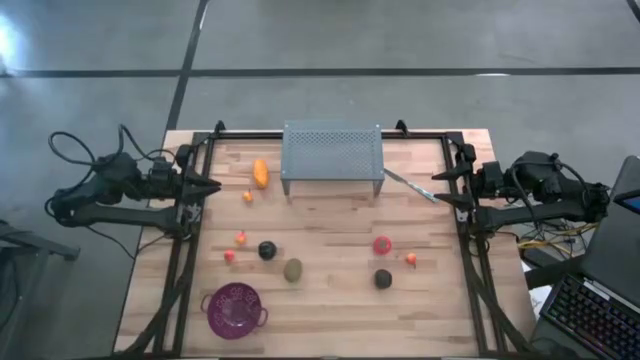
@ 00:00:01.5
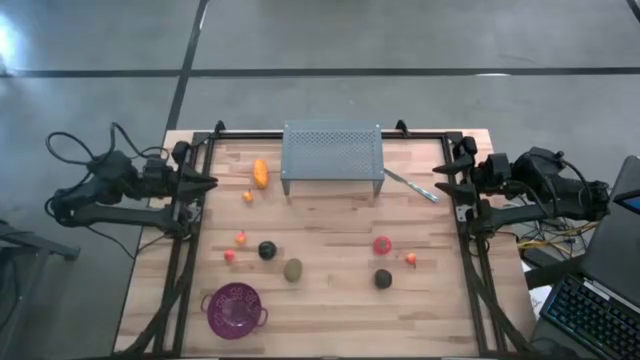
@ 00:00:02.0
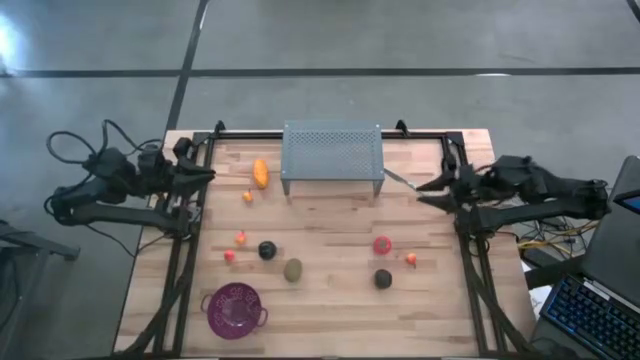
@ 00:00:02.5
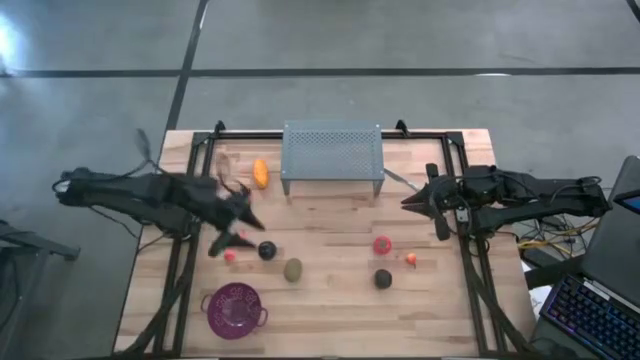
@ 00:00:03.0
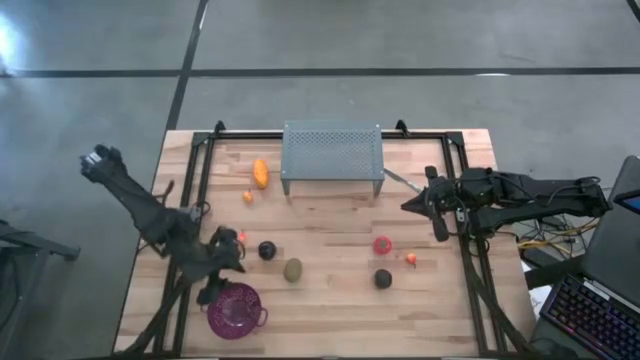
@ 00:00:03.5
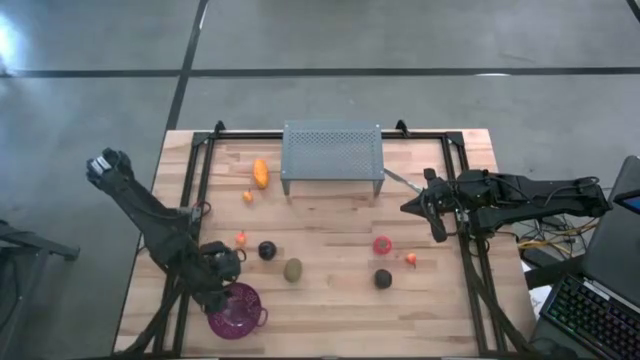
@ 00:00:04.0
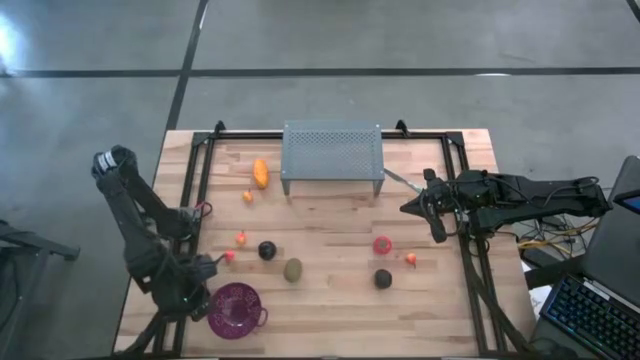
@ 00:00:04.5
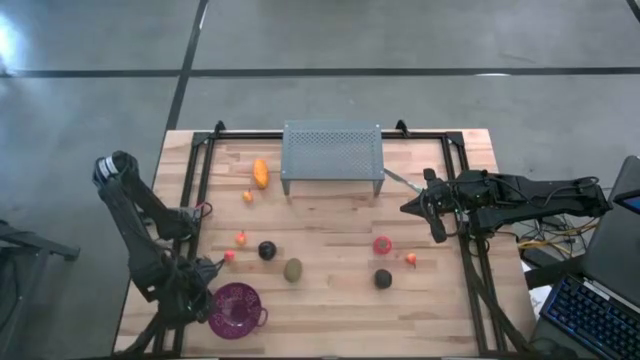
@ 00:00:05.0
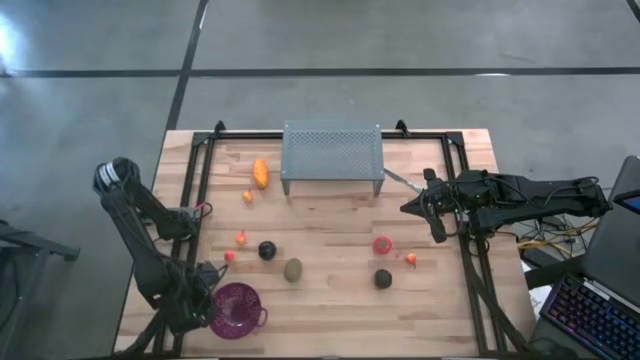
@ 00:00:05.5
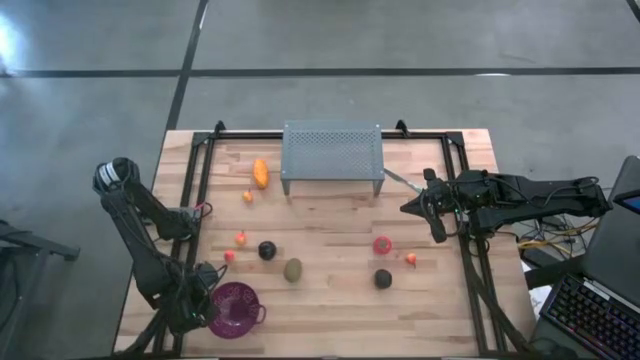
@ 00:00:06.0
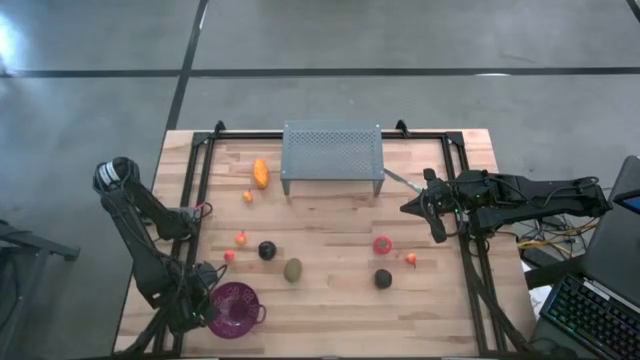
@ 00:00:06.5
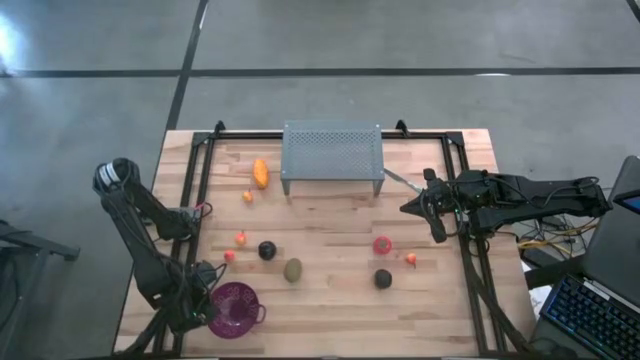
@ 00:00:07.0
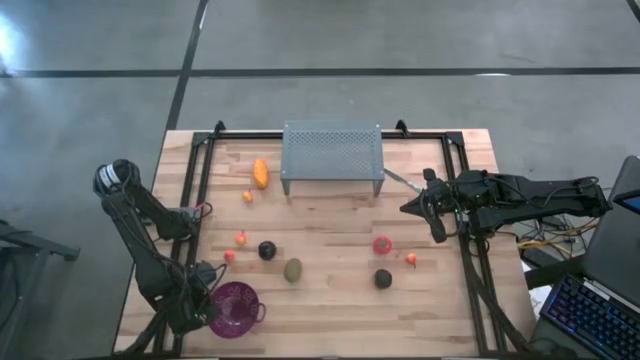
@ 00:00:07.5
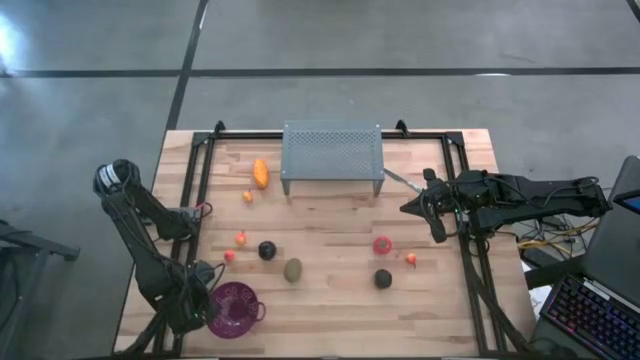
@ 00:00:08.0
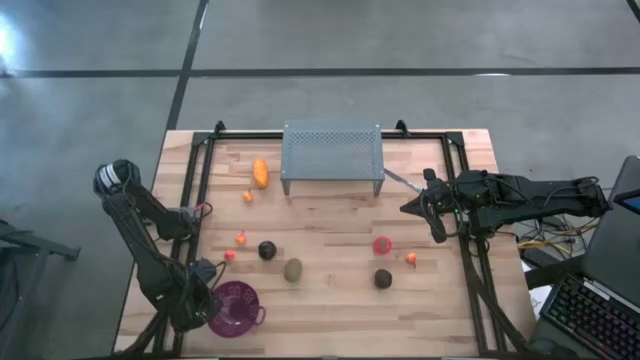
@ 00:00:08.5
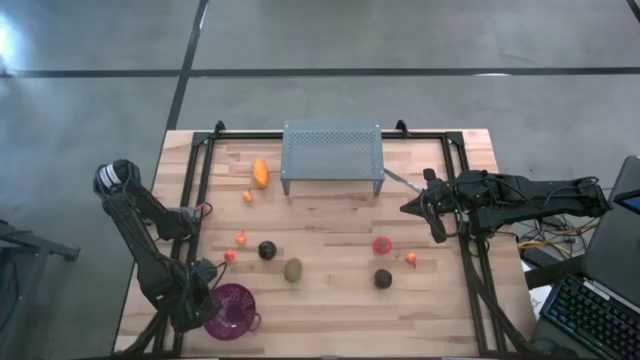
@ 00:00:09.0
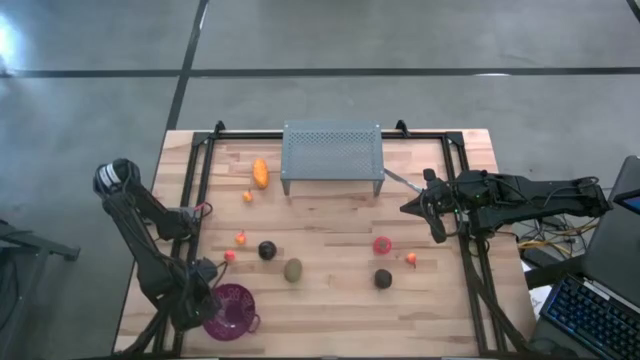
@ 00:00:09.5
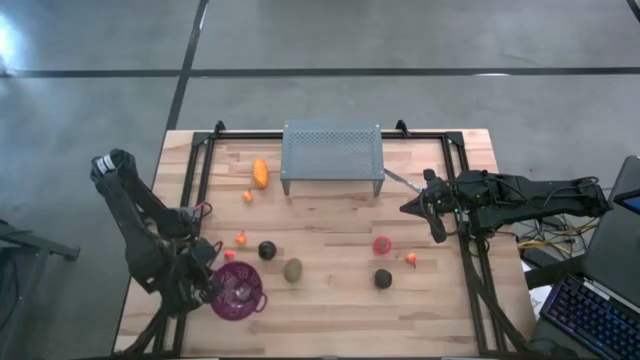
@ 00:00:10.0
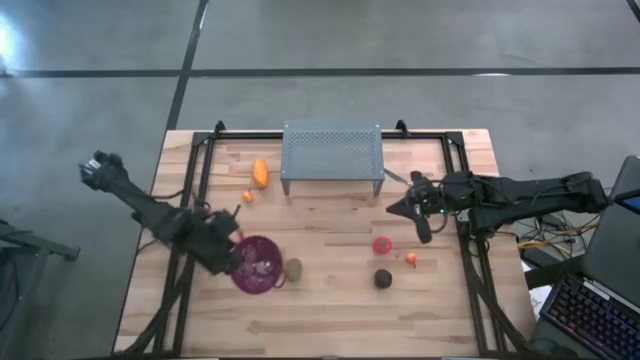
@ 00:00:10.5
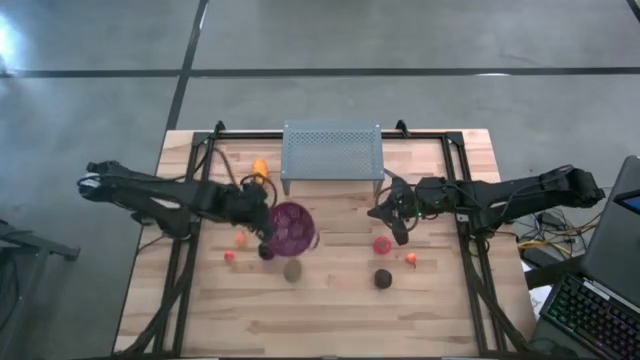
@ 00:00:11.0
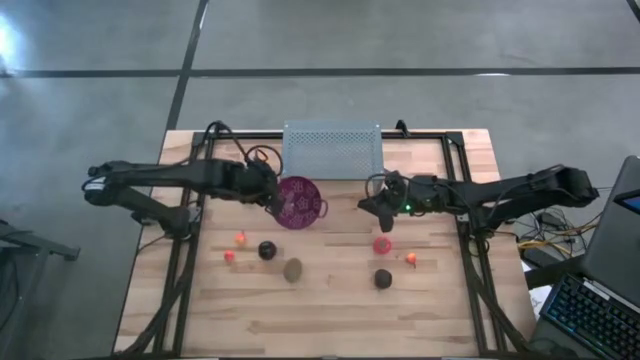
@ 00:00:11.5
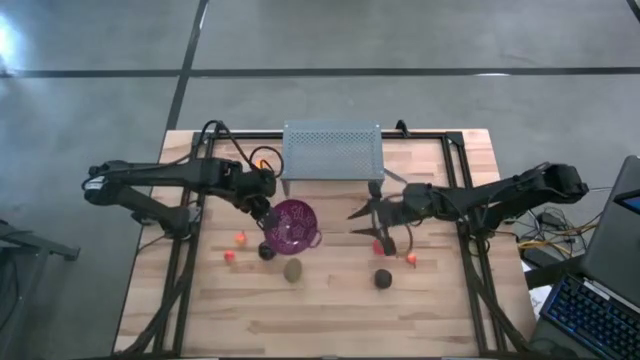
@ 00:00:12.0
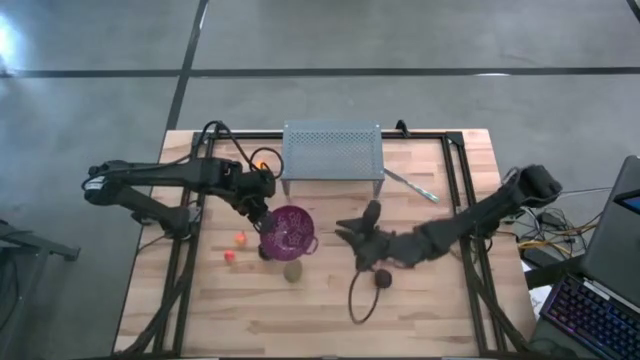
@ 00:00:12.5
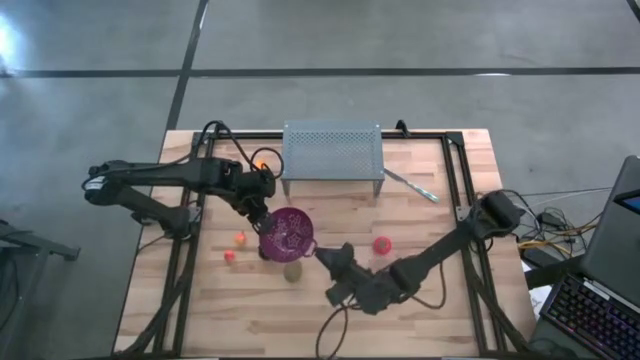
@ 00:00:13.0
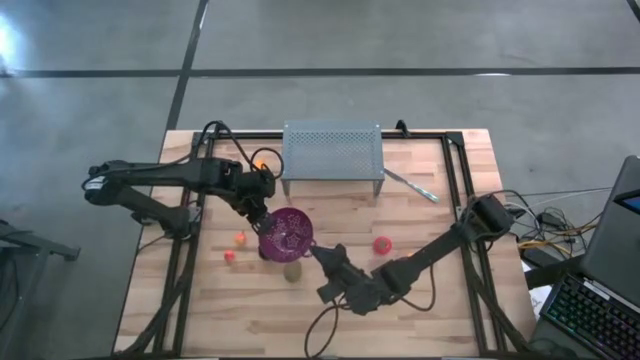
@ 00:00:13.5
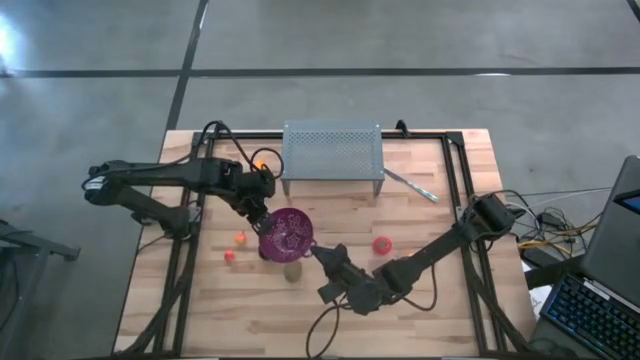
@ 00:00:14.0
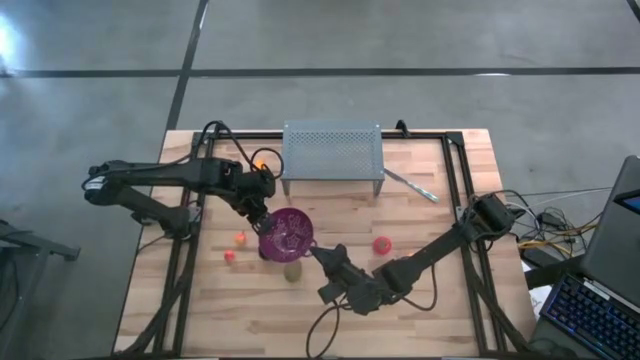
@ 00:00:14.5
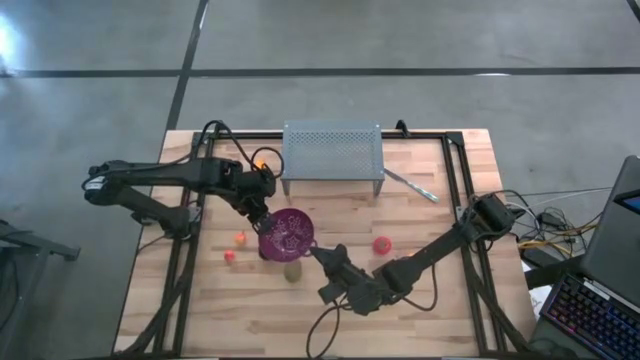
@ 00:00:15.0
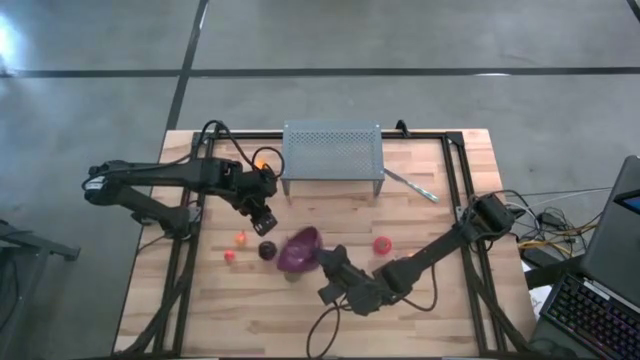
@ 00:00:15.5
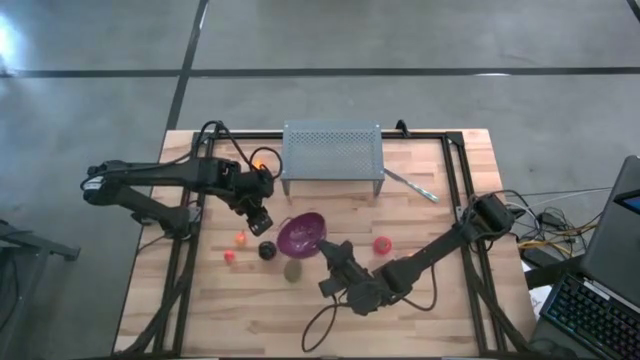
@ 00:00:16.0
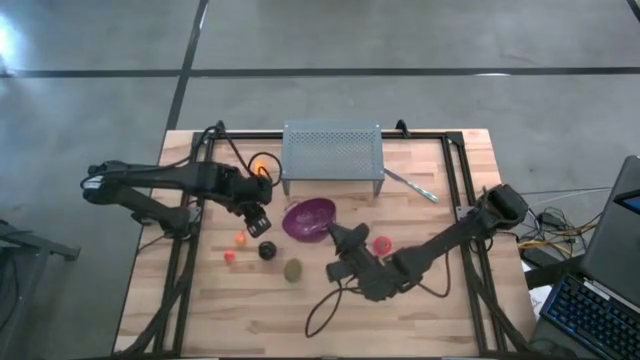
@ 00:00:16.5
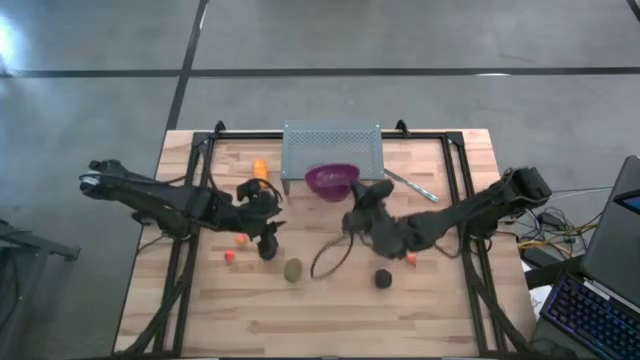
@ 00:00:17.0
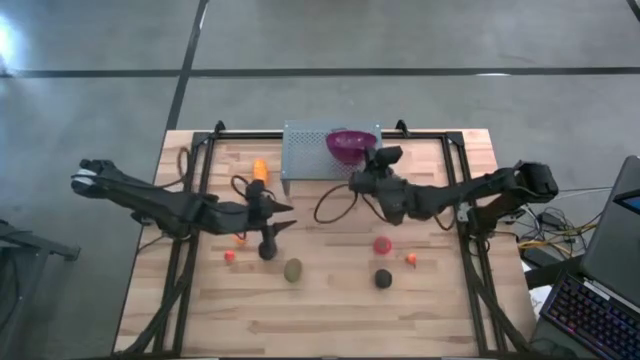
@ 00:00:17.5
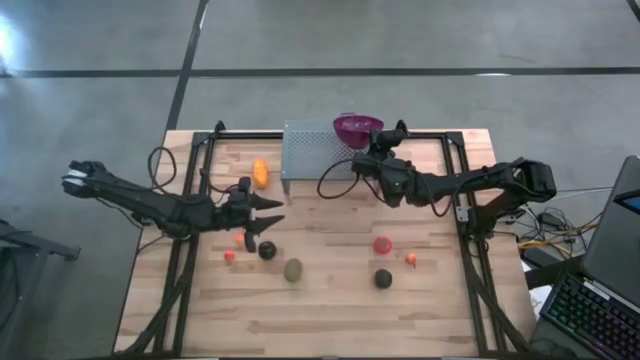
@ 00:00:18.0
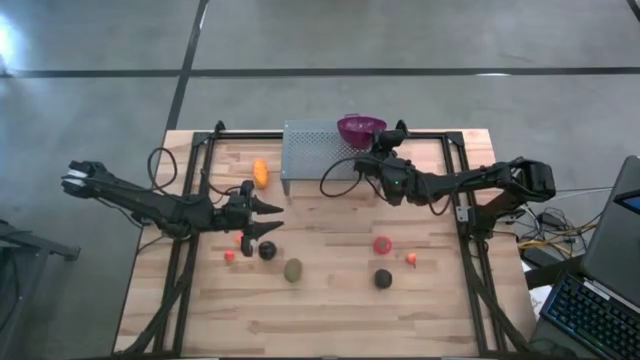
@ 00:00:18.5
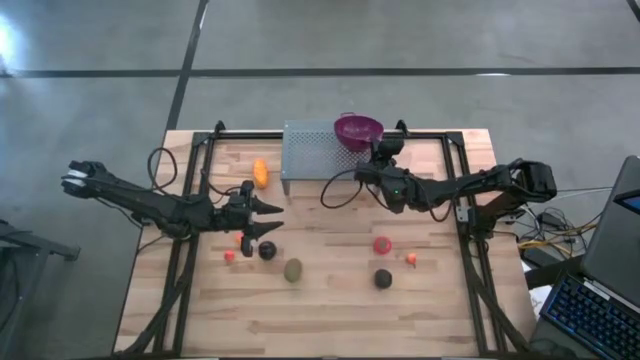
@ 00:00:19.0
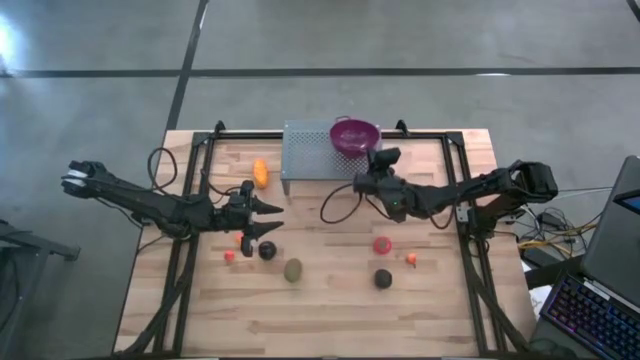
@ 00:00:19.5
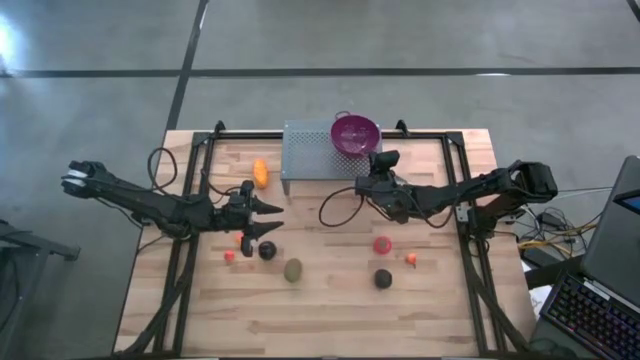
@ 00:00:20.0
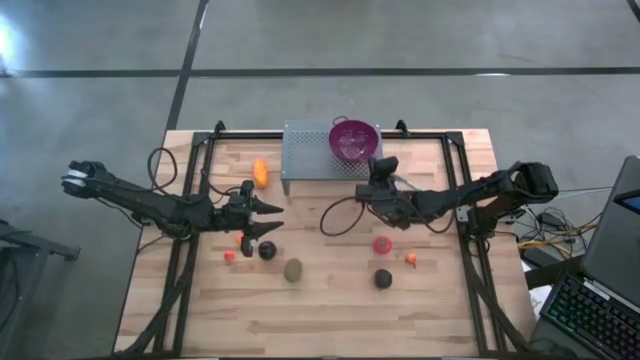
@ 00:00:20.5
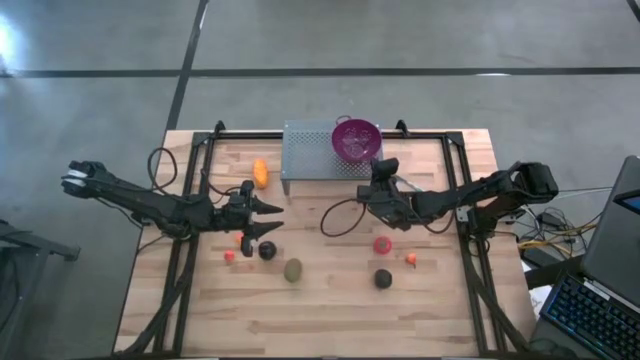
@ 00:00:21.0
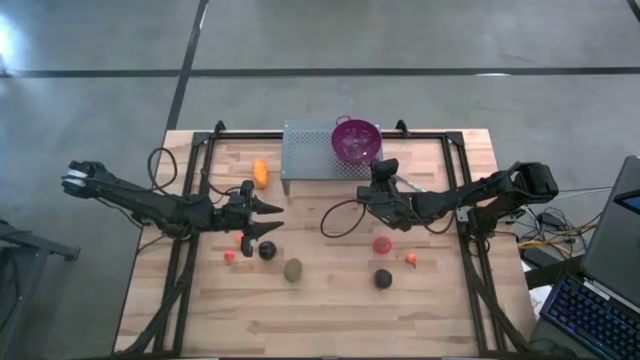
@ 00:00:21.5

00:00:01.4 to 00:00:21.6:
Task: Pick & Place Fruit
Put the purple strainer bowl on the shelf
